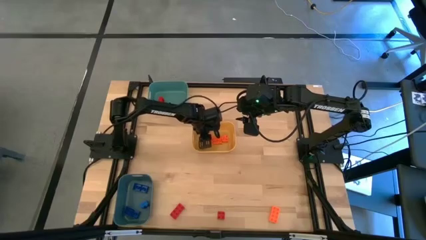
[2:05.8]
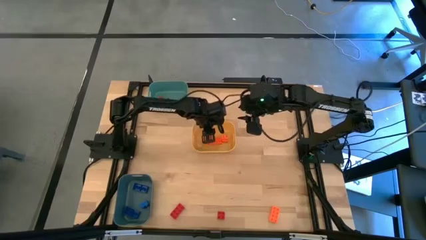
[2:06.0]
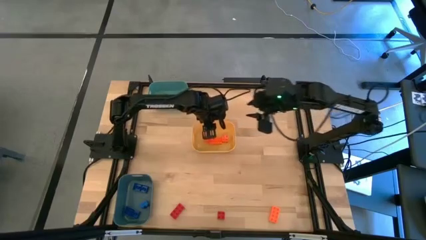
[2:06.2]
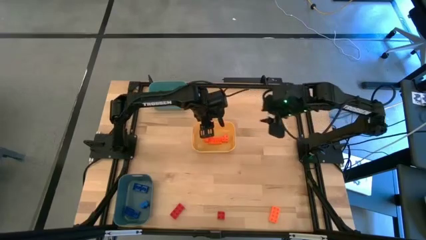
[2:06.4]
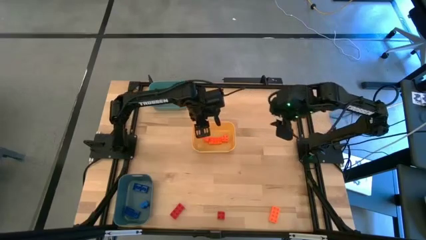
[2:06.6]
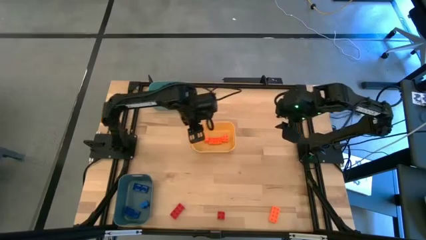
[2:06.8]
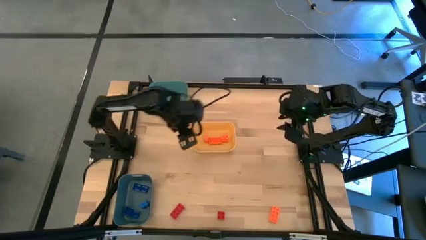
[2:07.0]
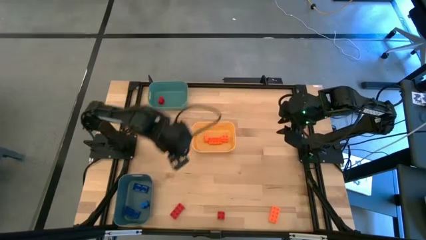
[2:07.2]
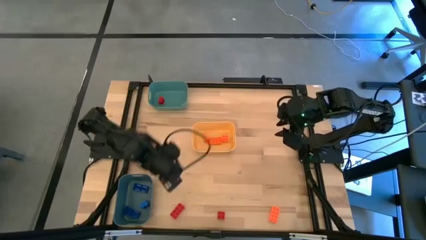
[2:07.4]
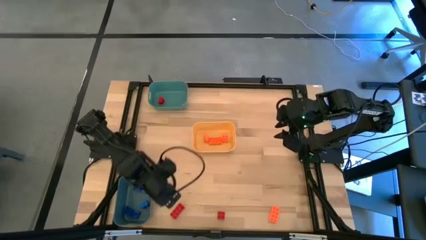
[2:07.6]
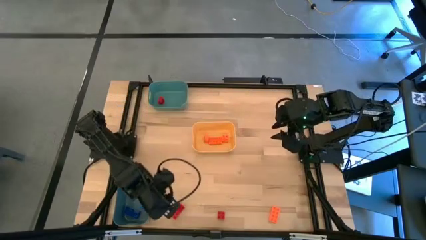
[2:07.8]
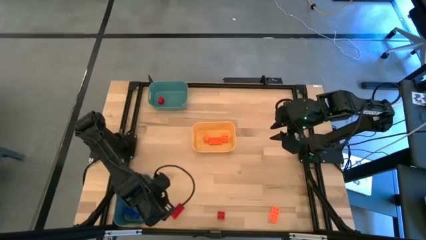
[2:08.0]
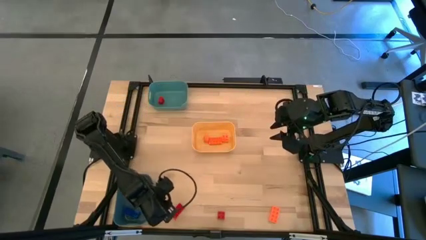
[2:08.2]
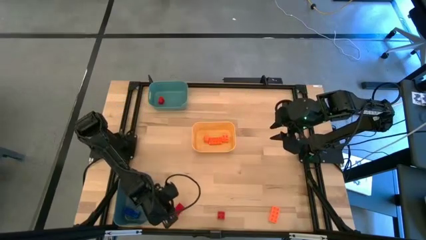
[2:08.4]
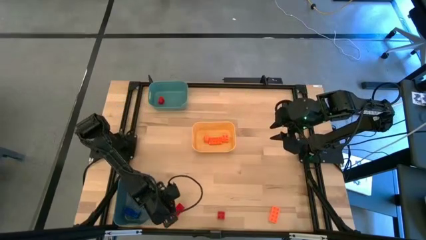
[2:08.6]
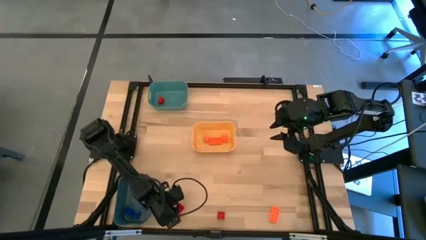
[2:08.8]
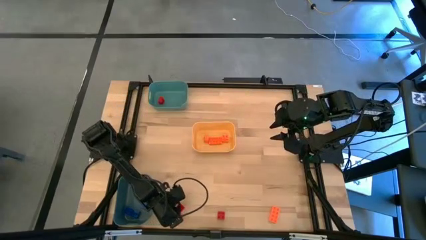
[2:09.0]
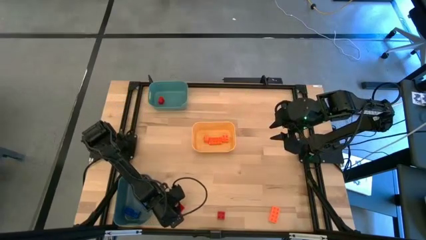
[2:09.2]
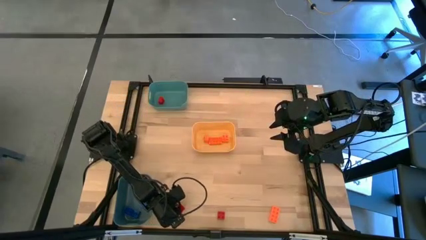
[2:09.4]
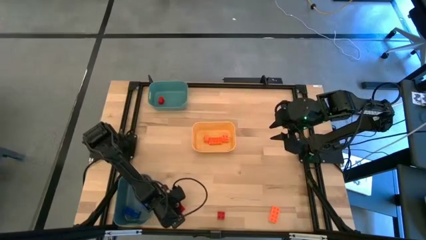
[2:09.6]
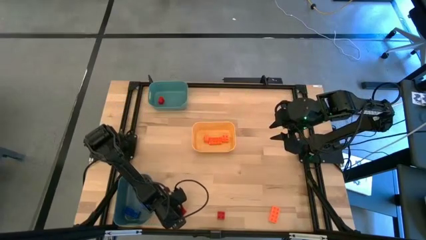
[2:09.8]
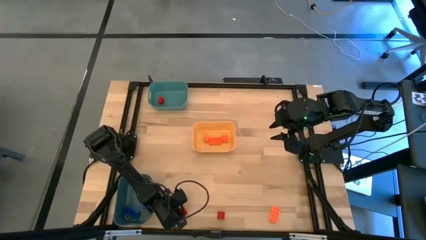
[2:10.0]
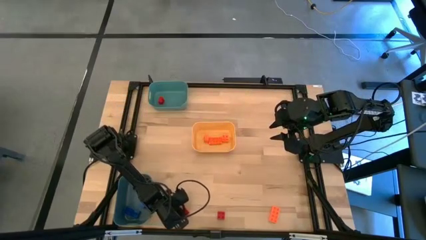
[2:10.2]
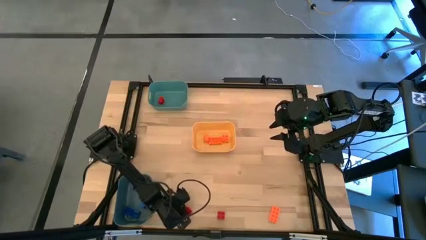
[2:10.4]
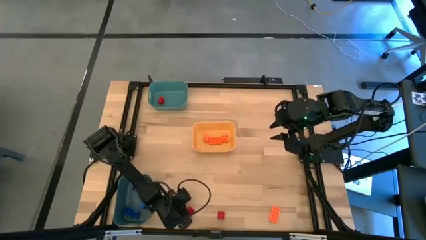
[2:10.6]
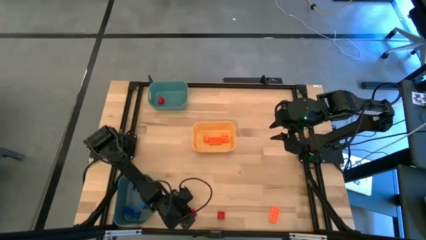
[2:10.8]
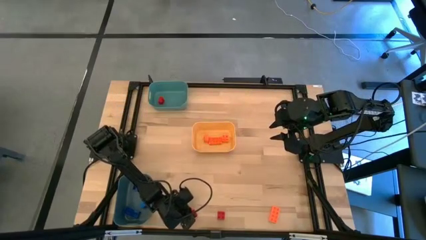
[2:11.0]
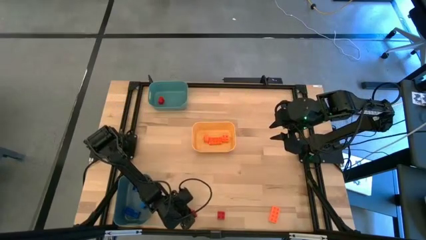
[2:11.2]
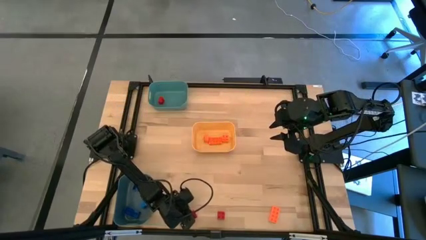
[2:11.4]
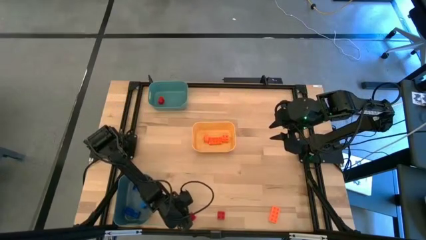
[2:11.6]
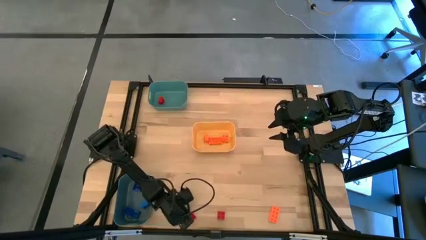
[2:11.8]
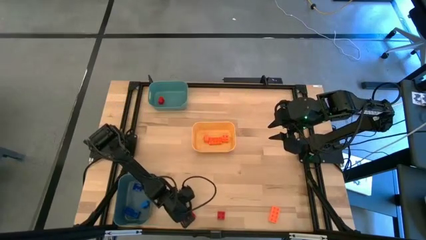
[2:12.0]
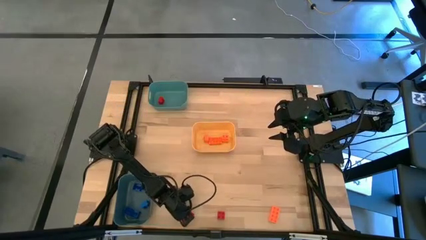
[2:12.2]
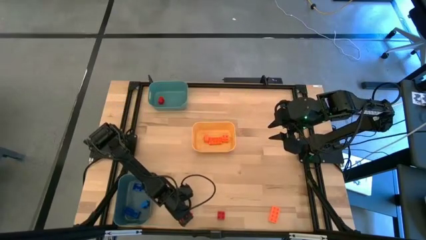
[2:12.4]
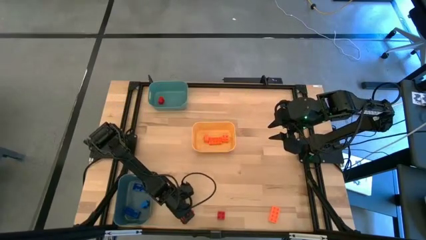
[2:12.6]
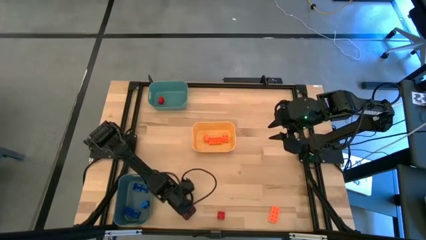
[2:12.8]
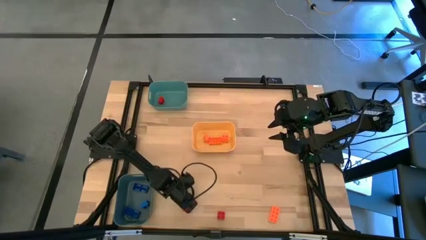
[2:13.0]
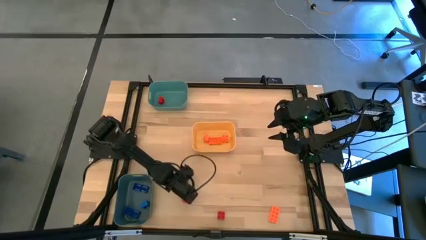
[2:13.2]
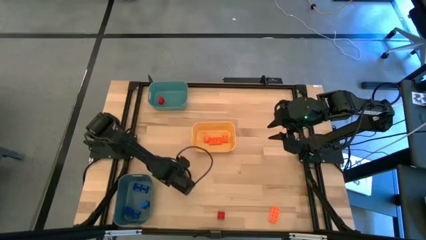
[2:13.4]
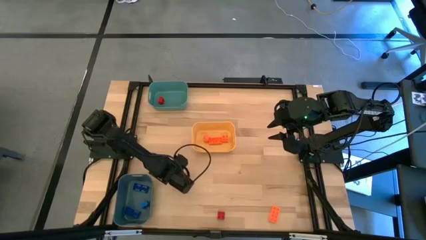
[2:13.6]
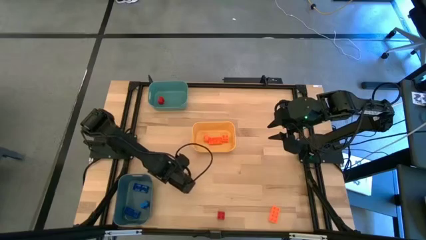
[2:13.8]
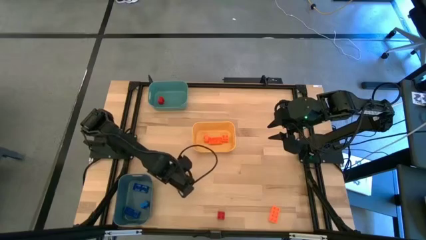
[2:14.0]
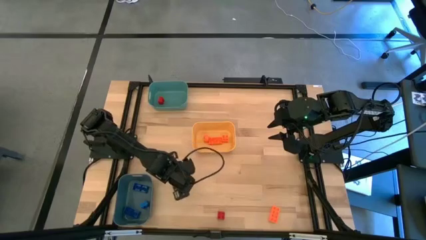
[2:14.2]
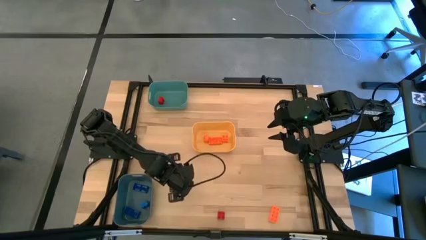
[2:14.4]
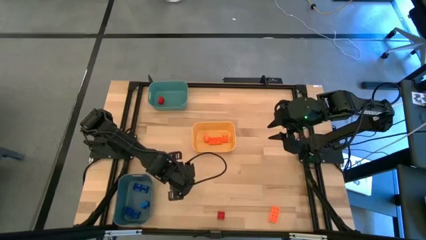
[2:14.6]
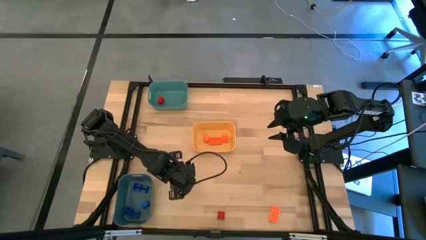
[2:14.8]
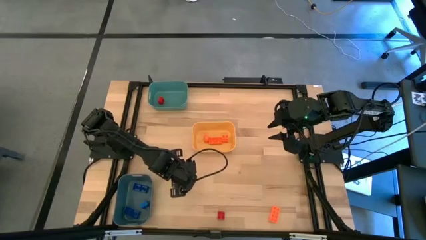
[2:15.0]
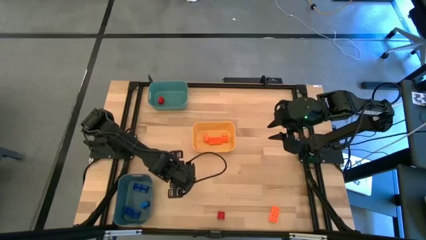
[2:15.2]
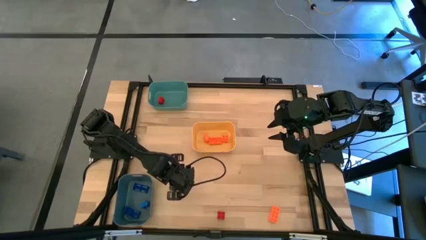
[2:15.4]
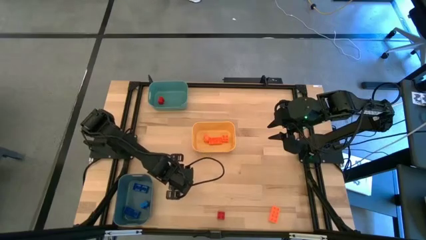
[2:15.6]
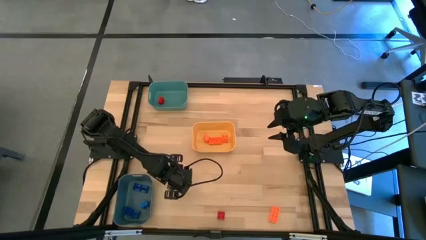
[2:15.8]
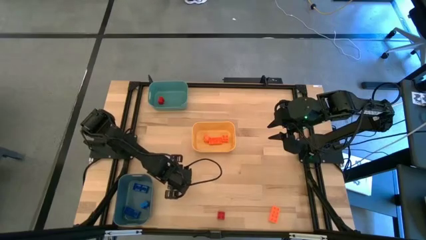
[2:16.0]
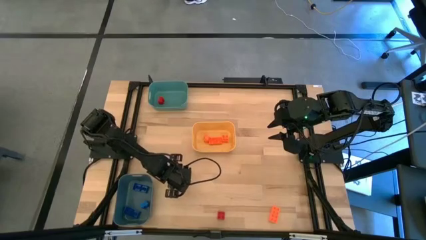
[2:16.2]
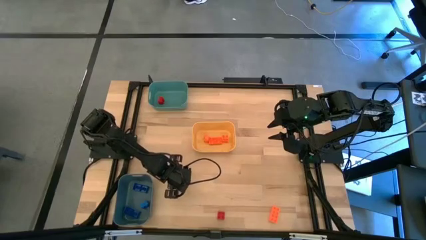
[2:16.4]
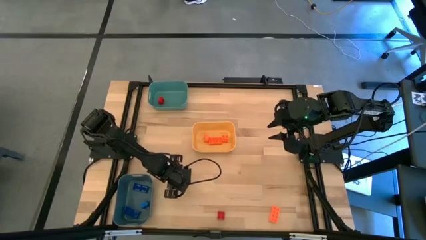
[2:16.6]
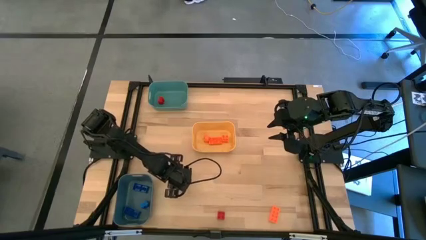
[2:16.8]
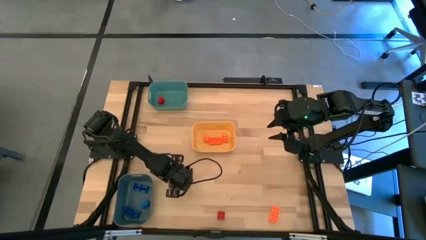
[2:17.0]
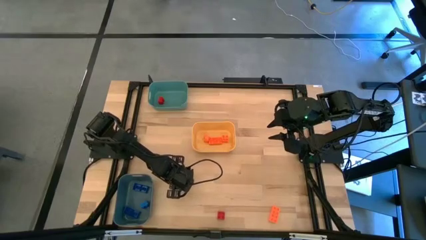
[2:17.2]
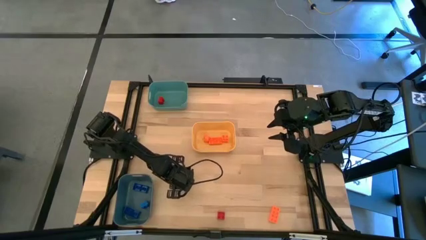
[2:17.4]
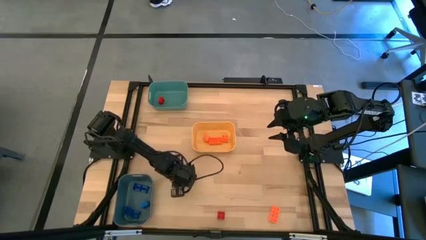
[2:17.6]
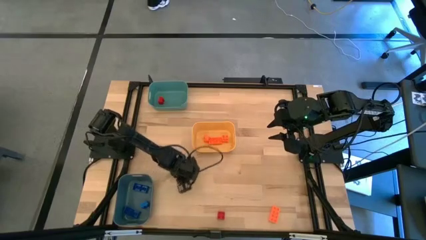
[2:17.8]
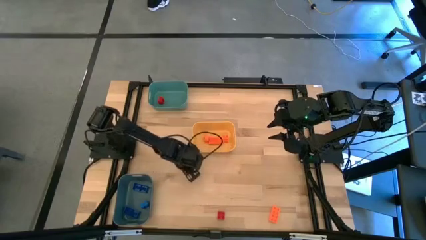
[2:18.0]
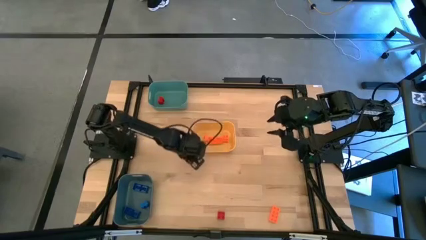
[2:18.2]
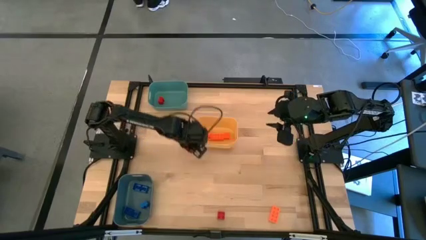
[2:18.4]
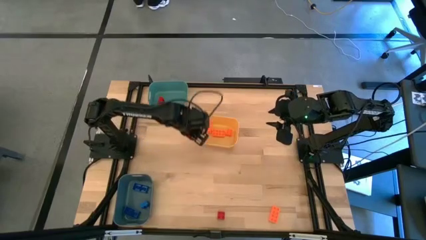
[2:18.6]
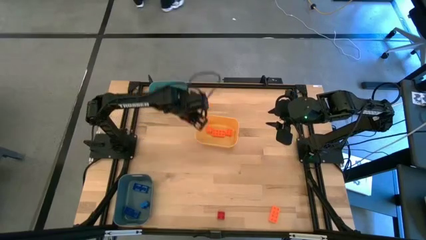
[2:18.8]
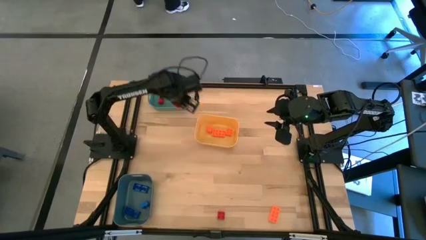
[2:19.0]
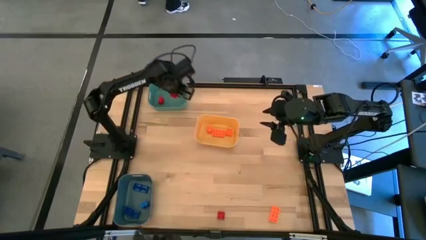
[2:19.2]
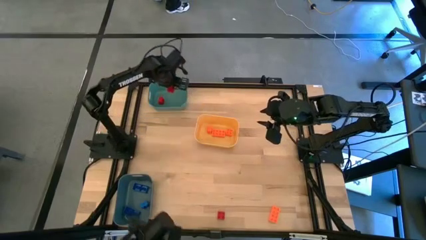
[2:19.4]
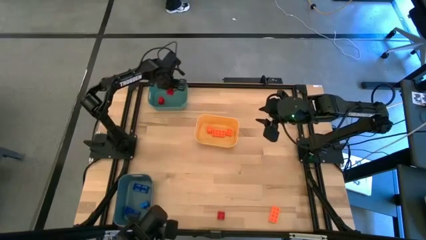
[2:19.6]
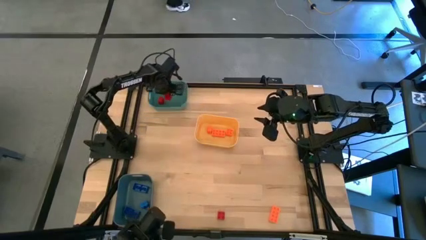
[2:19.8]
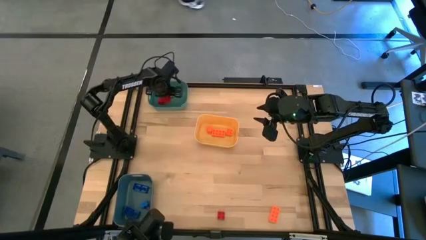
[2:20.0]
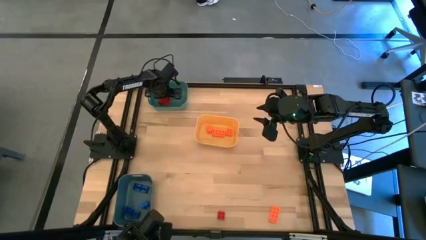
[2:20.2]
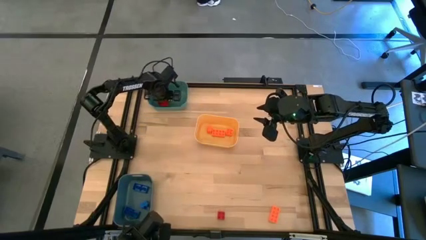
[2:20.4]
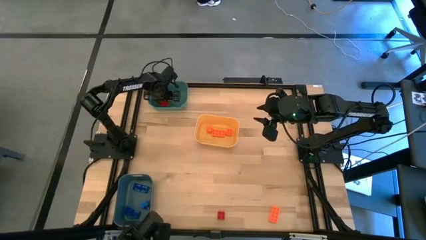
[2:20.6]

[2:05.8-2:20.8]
Task: Sort & place blocks by color
Put the left red 8 stud game piece into the green bin

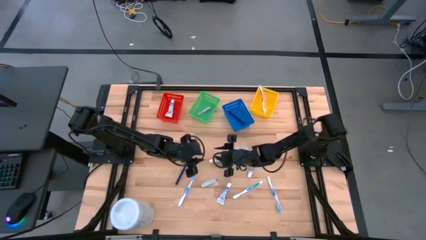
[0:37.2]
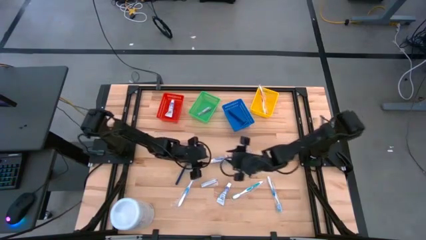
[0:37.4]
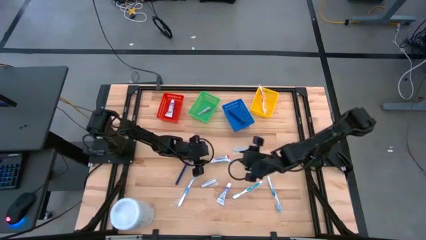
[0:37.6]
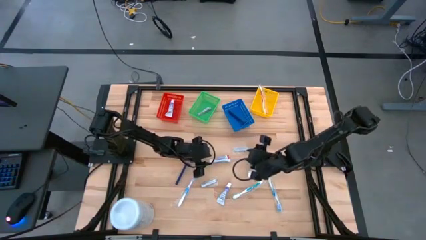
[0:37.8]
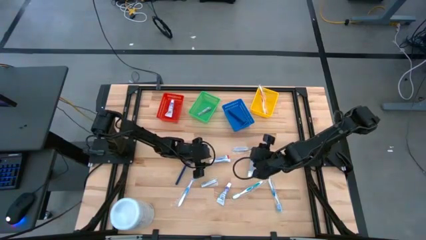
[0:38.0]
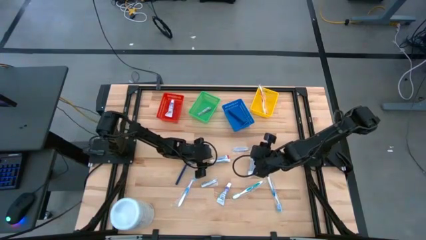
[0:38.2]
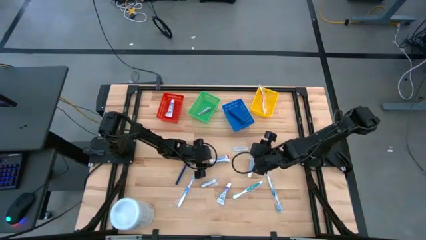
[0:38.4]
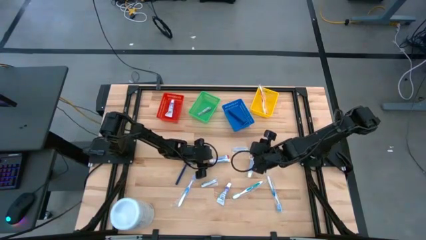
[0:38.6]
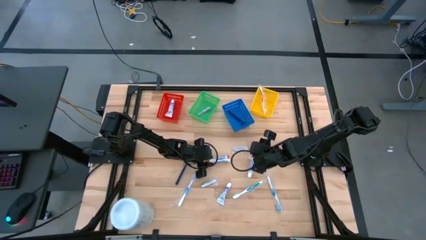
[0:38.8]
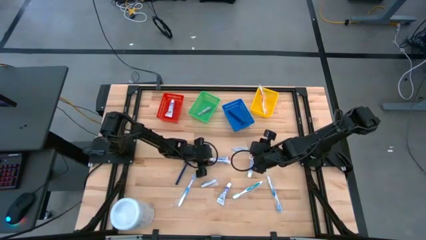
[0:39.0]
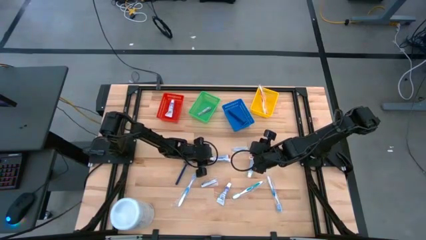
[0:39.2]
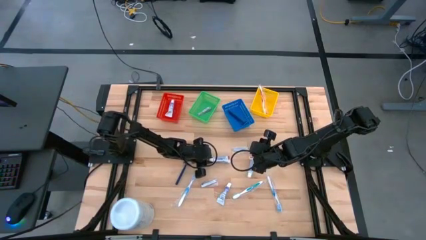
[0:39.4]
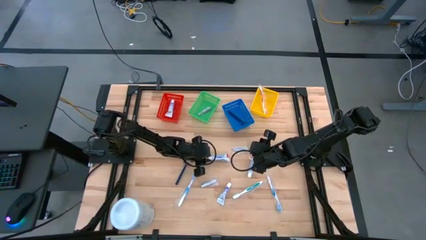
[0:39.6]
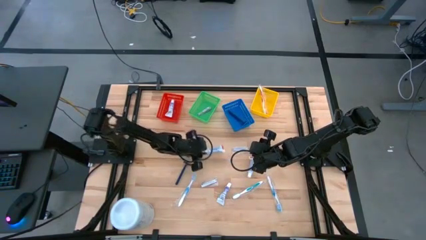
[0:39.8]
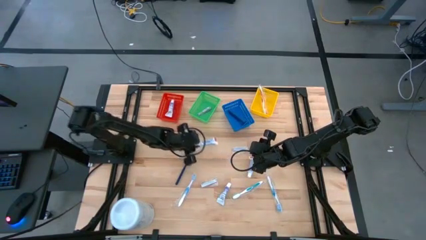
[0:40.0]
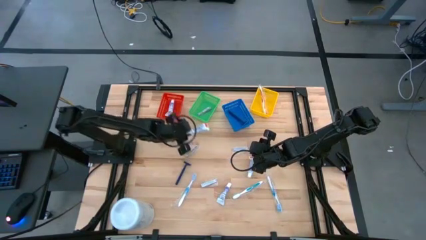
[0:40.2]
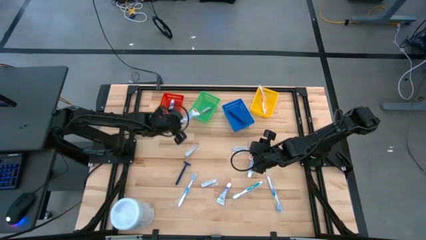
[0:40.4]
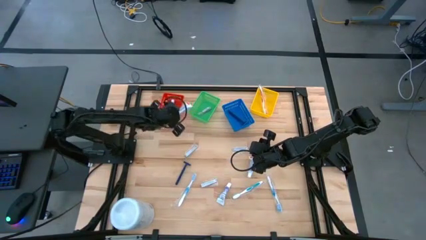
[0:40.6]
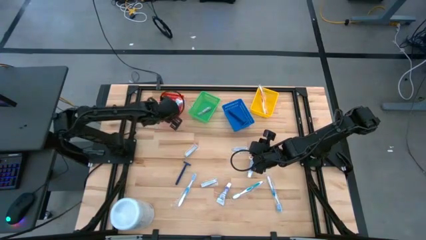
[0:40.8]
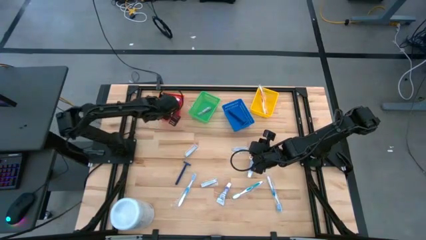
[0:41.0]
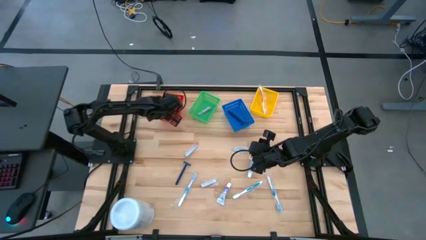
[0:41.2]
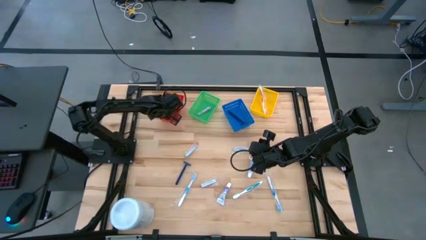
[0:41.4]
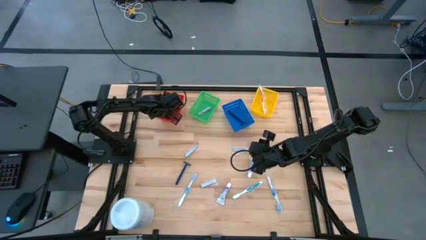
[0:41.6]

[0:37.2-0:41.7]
Task: Pick & Place Travel size toiletries
Put the white toothpaste in the red bin
